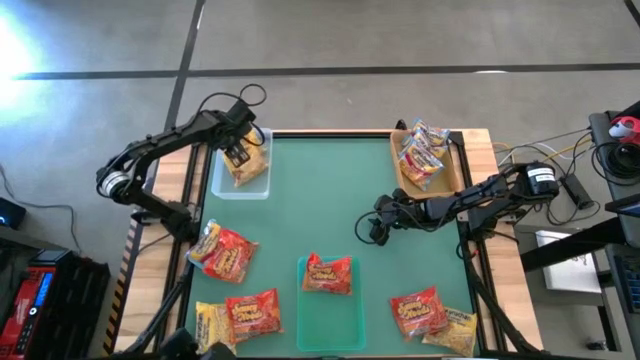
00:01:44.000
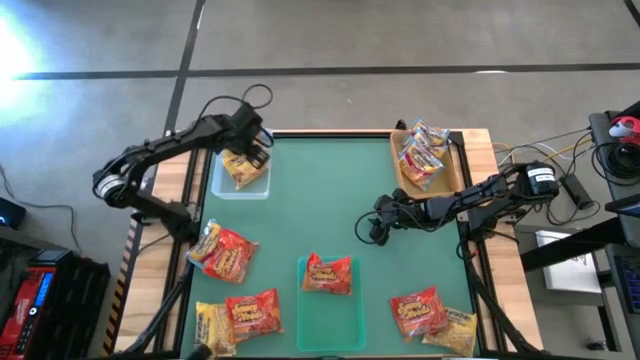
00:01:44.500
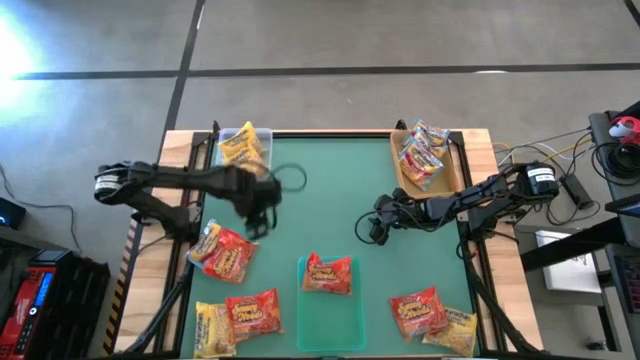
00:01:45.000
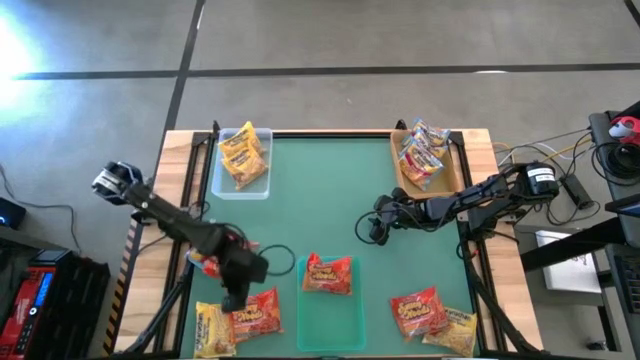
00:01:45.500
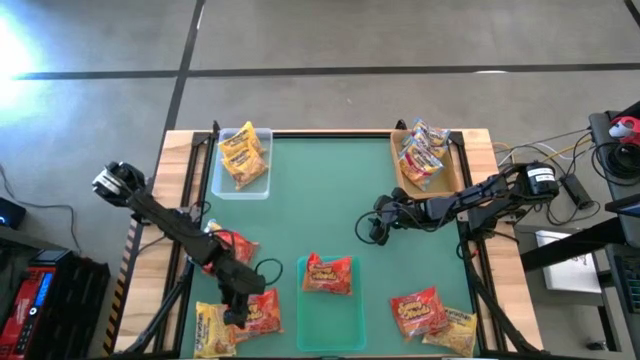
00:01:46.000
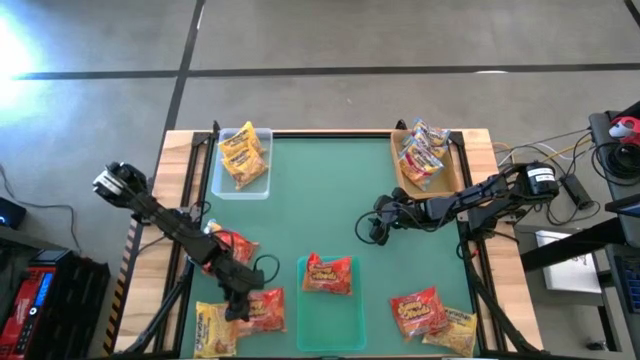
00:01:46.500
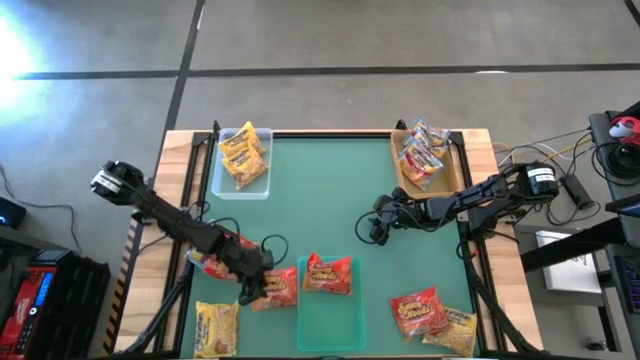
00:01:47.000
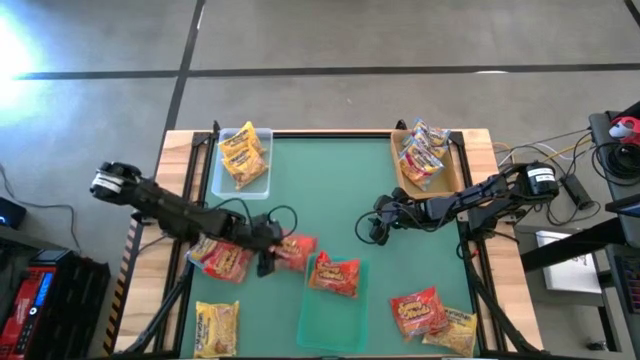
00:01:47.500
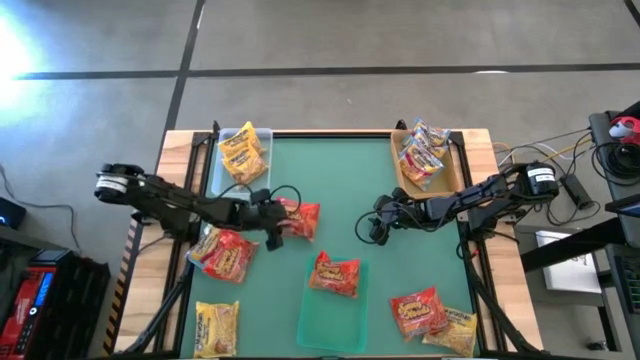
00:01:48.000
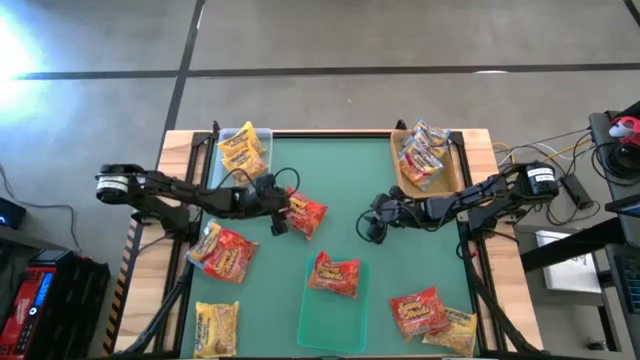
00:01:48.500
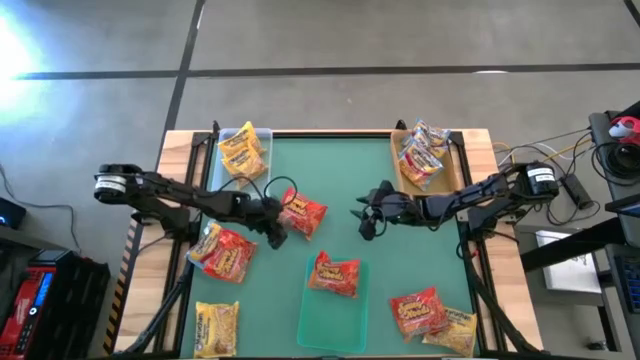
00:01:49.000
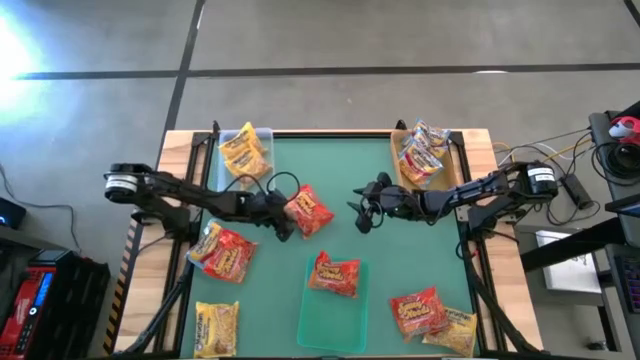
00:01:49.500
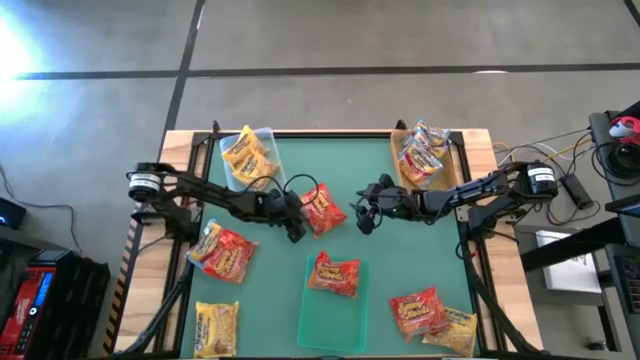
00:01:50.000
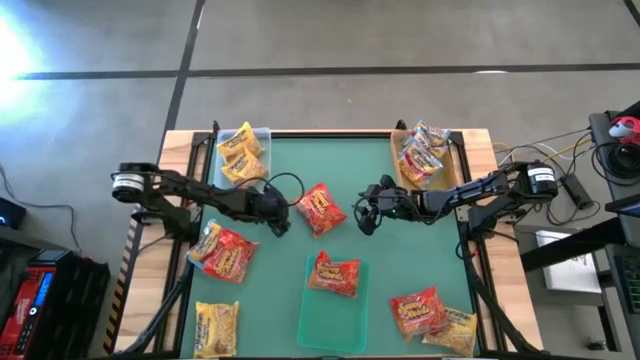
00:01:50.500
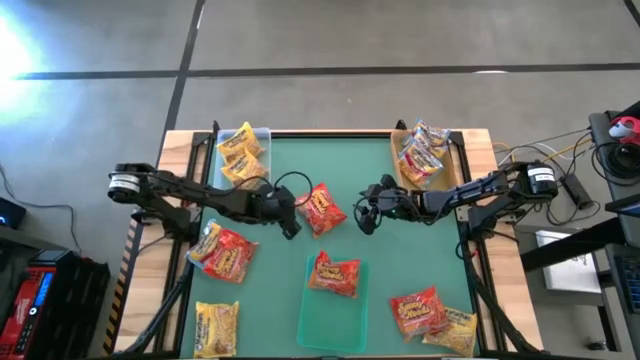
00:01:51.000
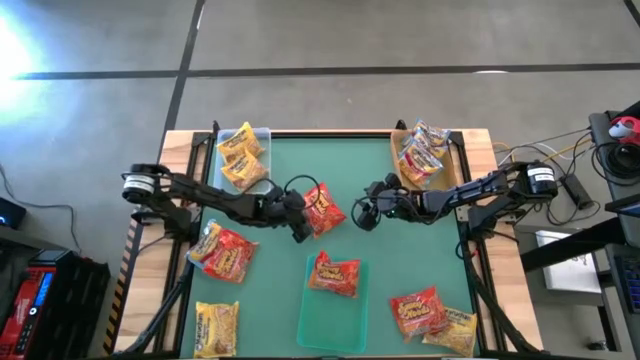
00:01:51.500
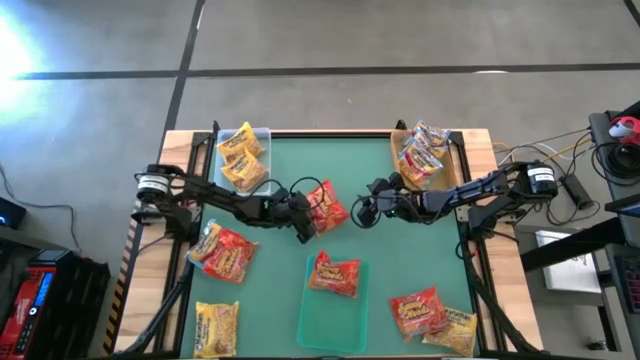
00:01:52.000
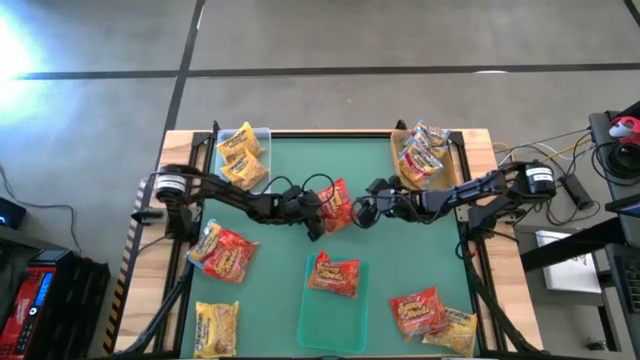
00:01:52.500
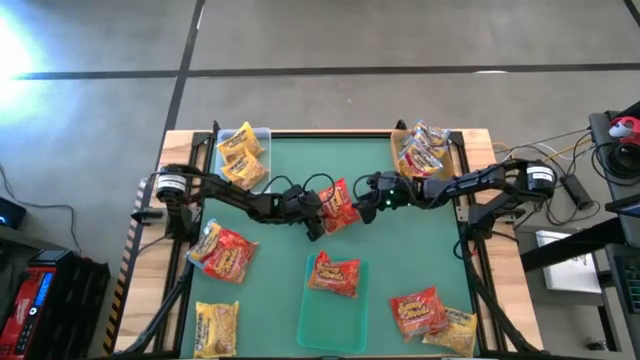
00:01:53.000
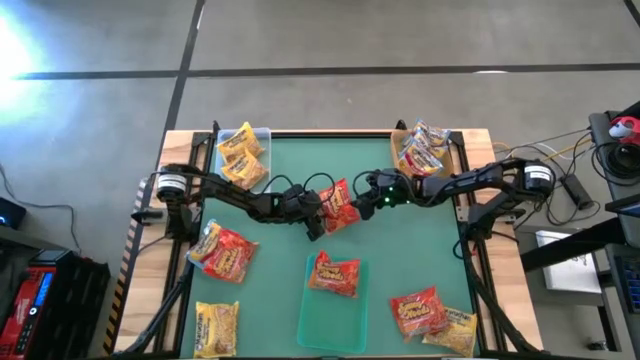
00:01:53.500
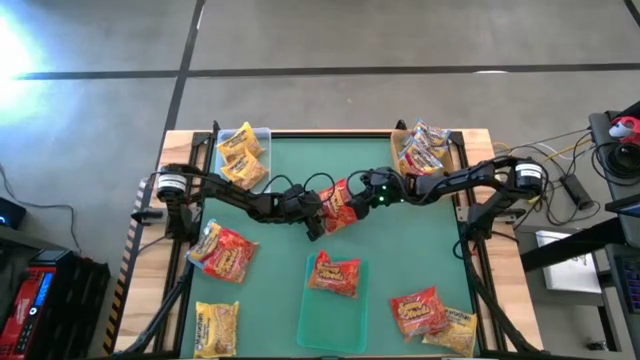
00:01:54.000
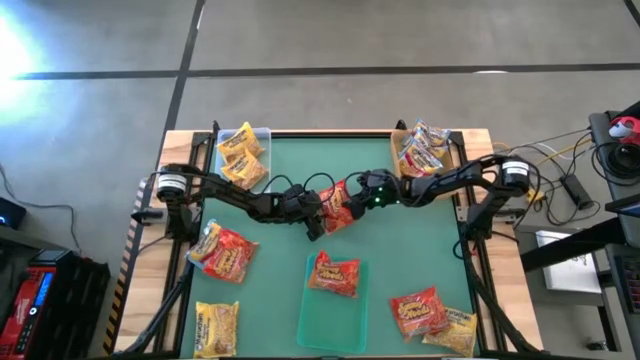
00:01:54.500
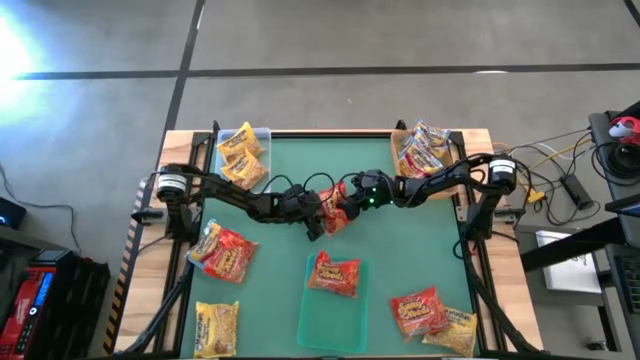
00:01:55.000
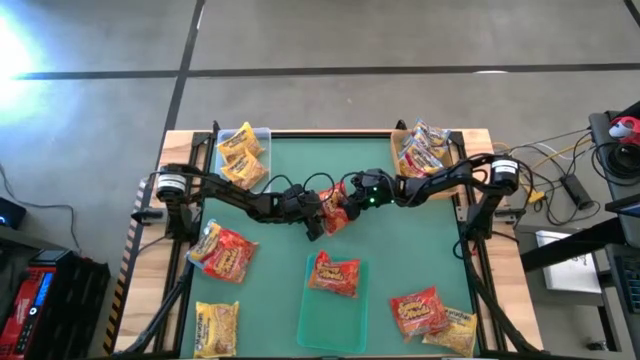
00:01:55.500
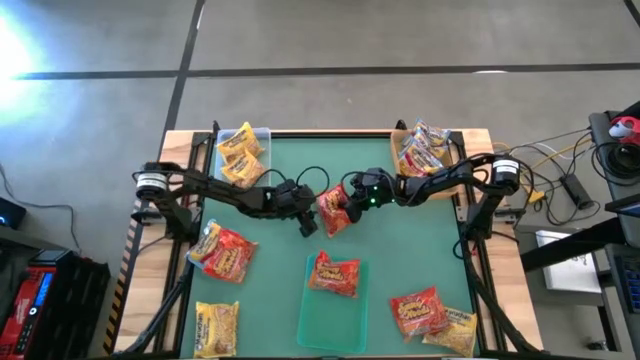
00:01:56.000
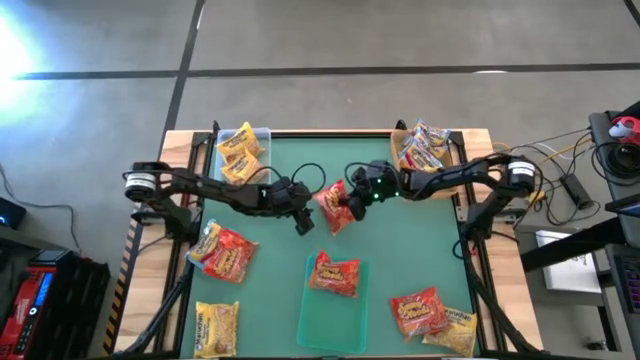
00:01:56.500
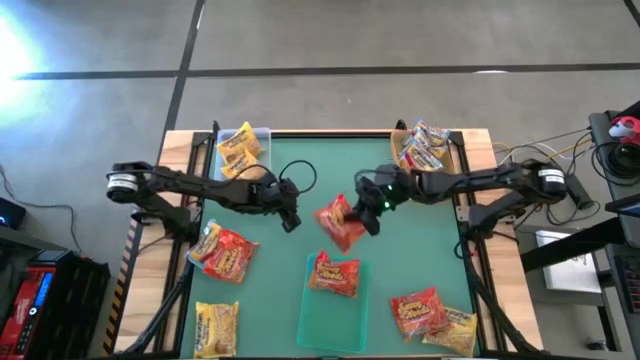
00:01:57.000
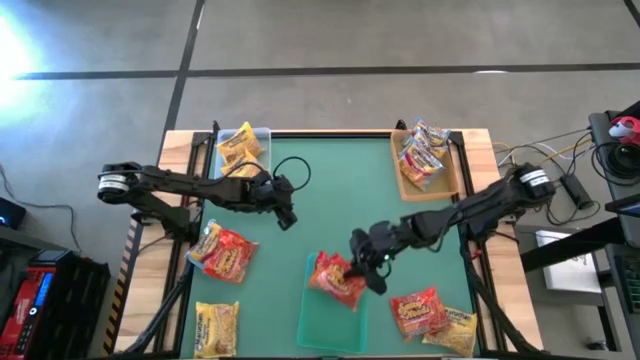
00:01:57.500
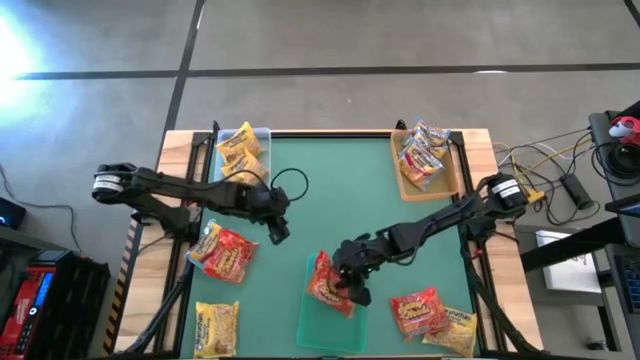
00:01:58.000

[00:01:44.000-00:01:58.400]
Task: Sort Maruchan noodles
Put the red noodle pack into the green bin

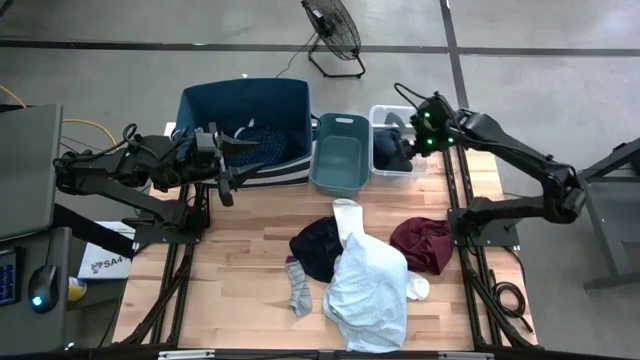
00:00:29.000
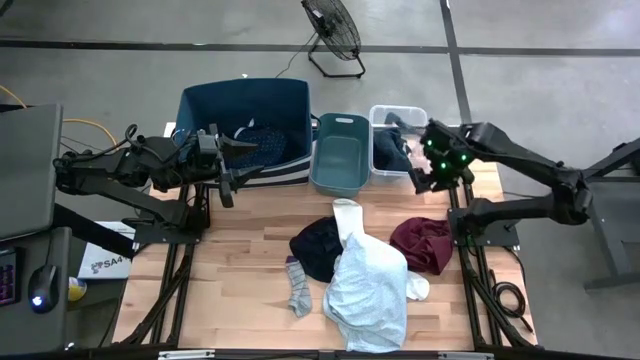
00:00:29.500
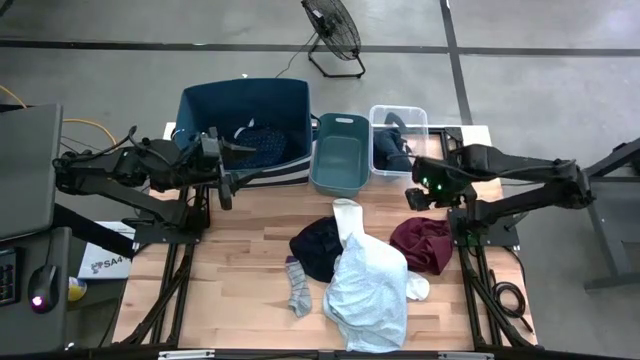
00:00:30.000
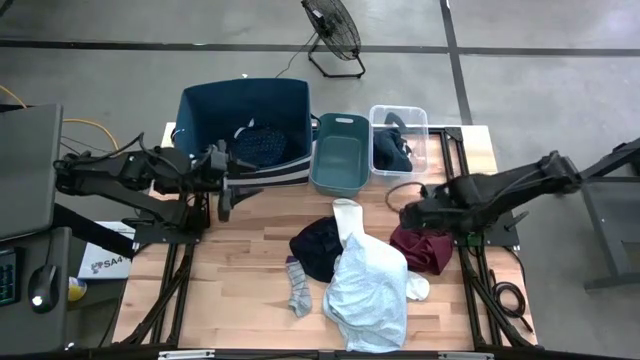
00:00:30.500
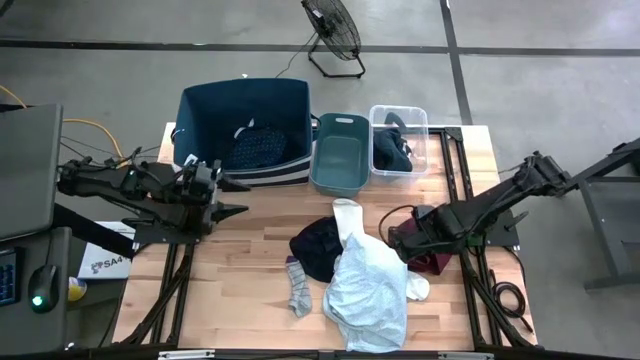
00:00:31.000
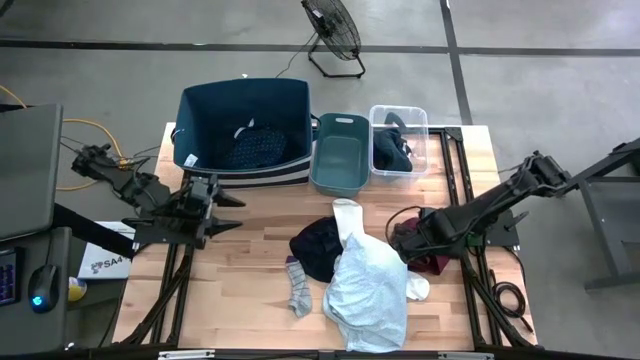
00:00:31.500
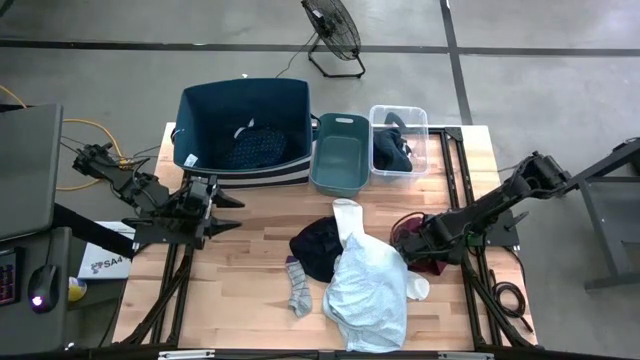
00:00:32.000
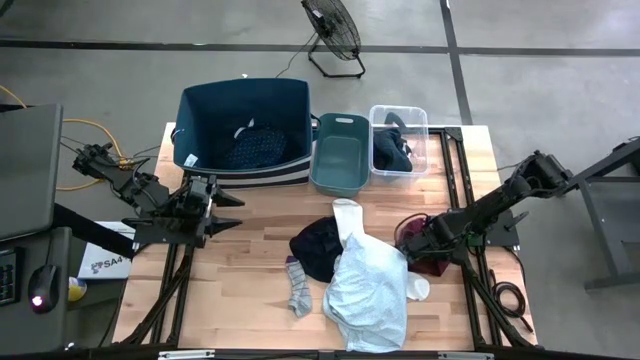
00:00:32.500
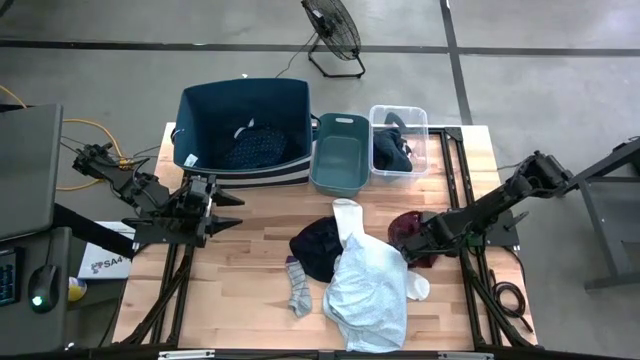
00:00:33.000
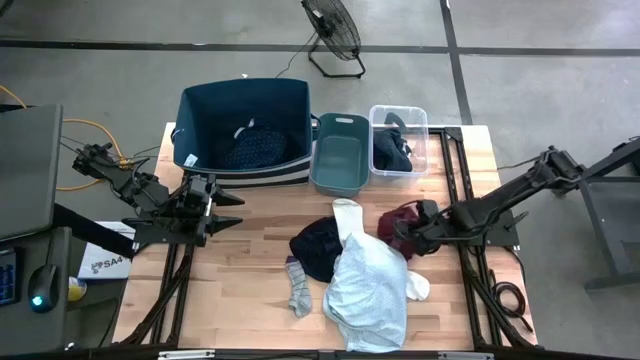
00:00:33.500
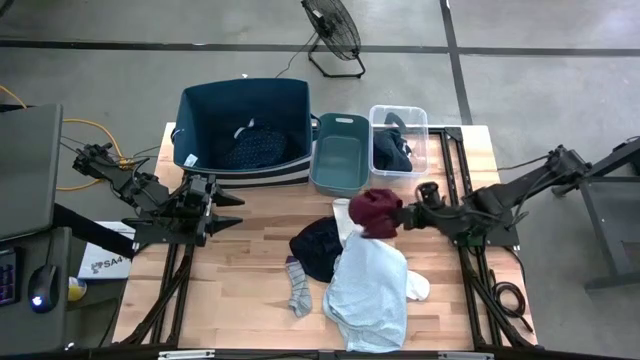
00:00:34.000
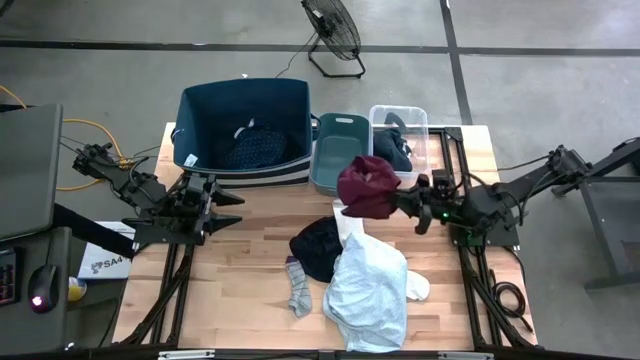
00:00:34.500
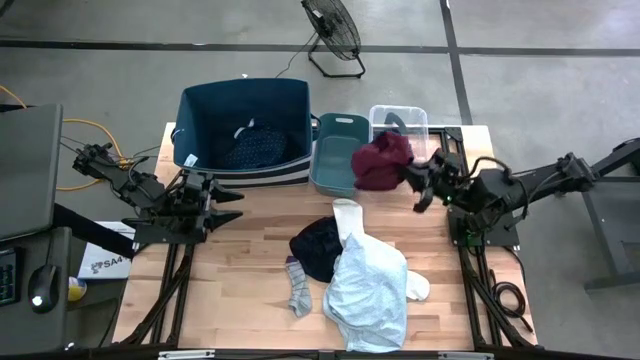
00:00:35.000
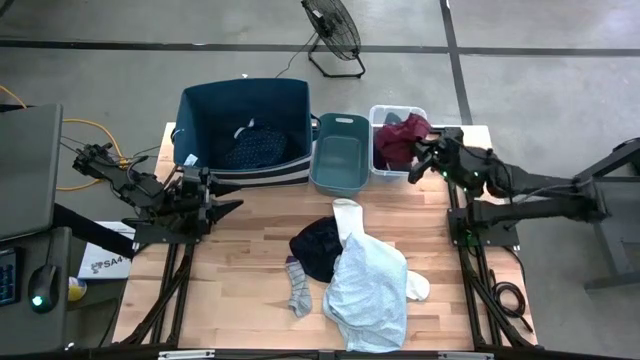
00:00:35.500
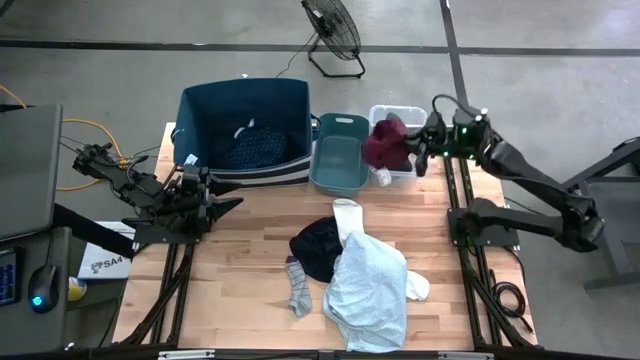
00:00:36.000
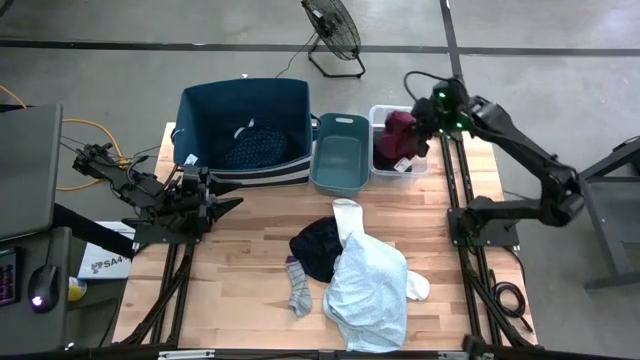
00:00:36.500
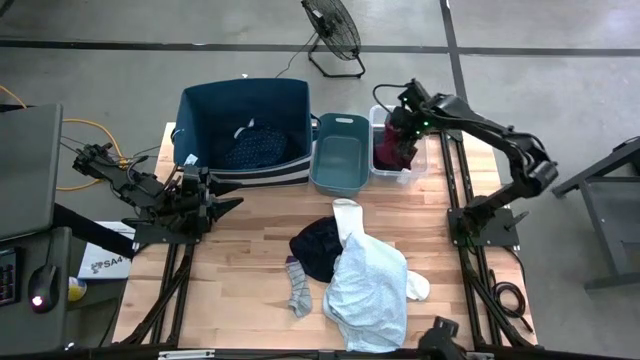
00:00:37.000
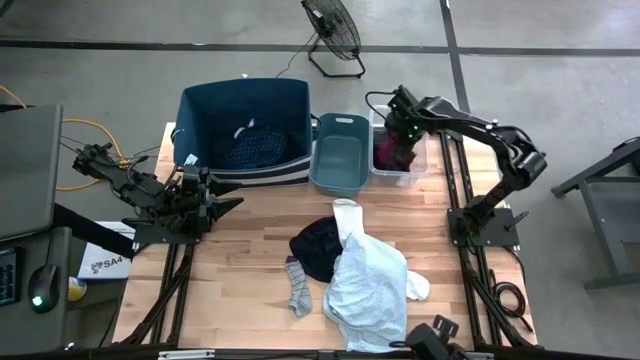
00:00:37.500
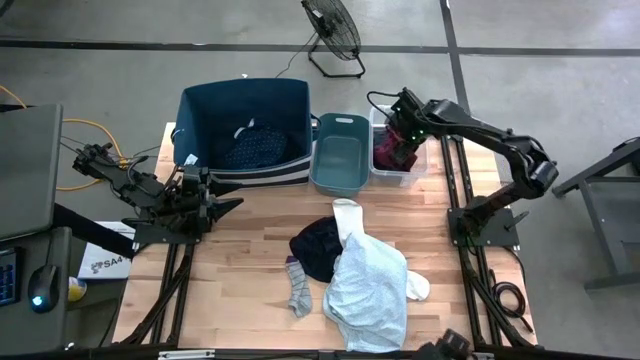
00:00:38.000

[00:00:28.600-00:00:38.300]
Task: Pick & Place Cloths
Put the red underwear into the transparent bin
